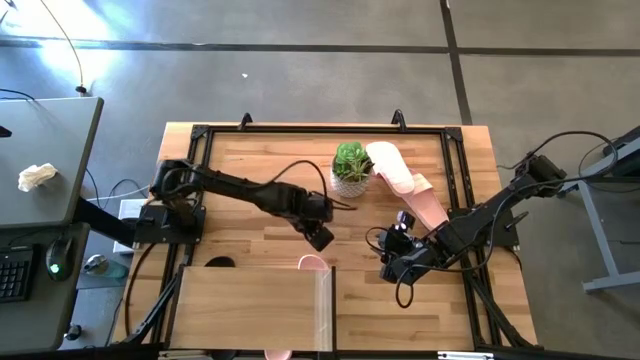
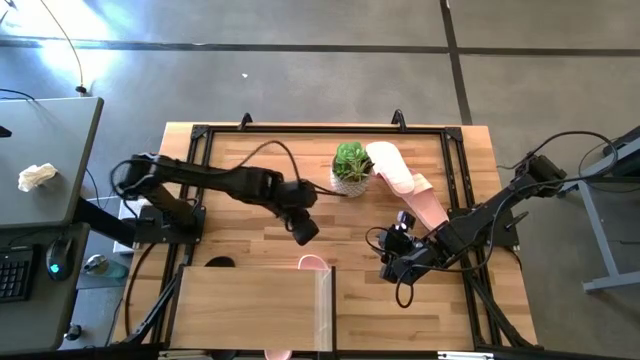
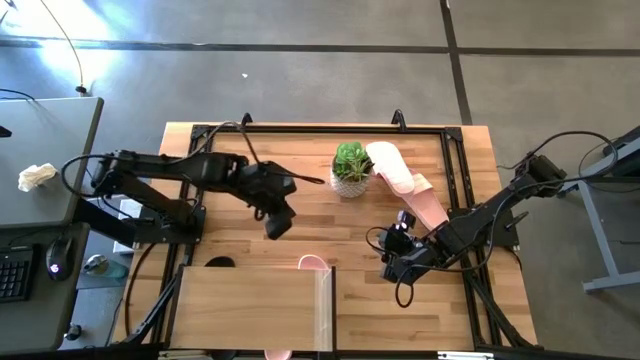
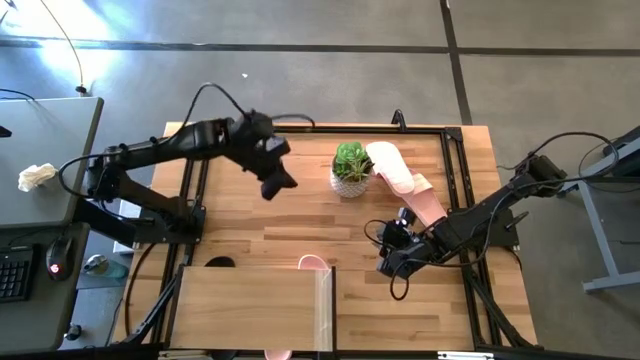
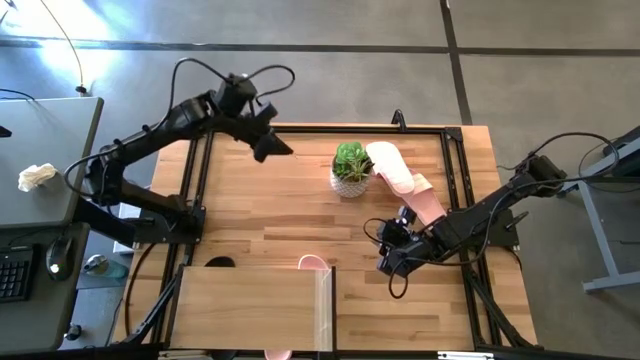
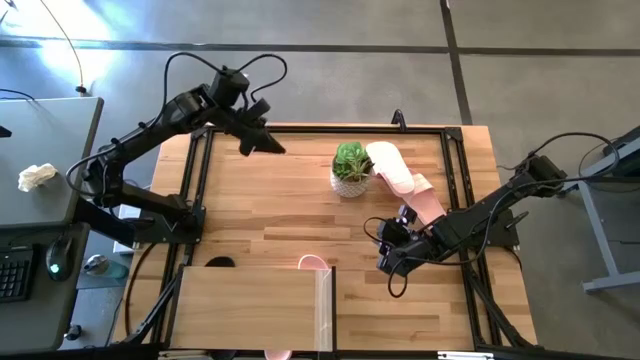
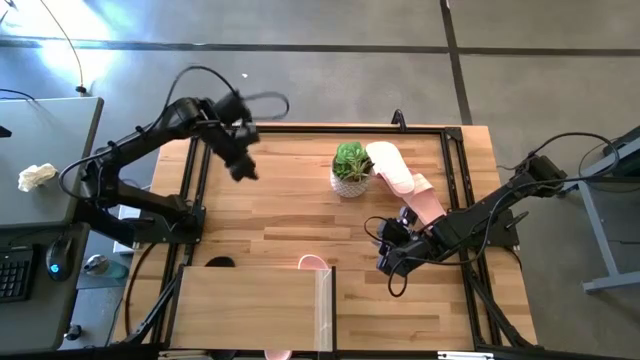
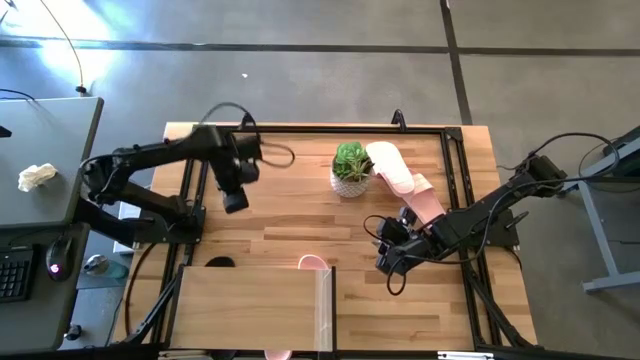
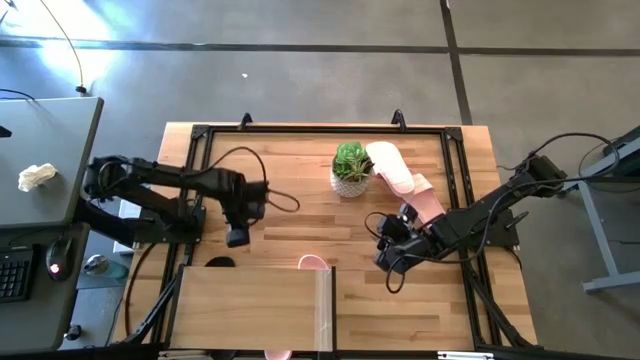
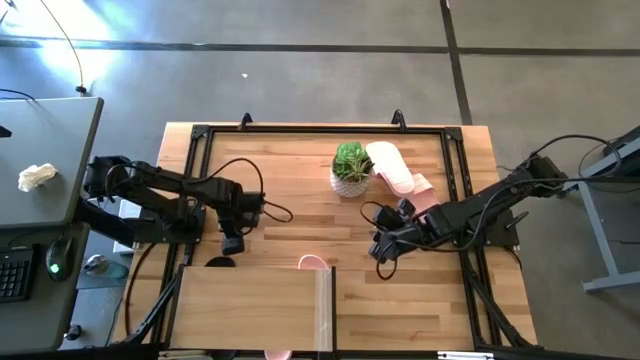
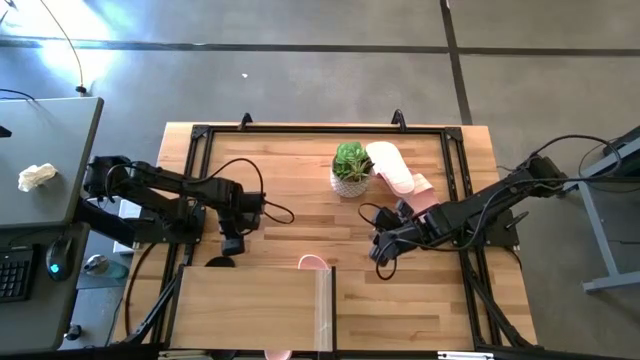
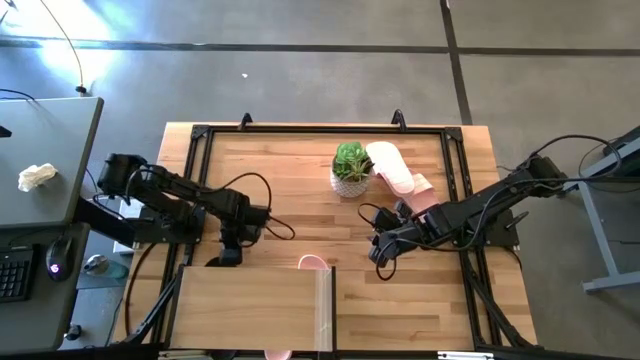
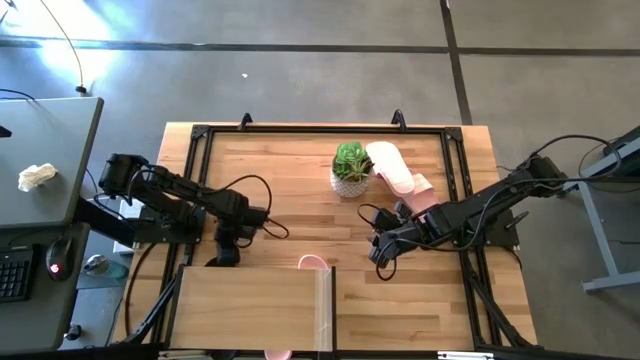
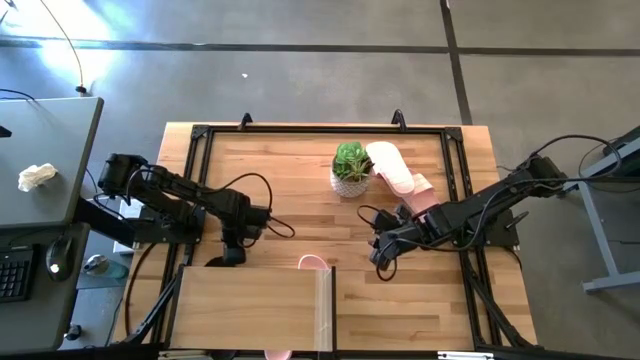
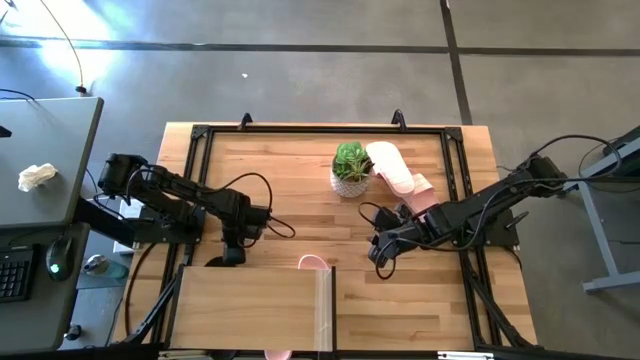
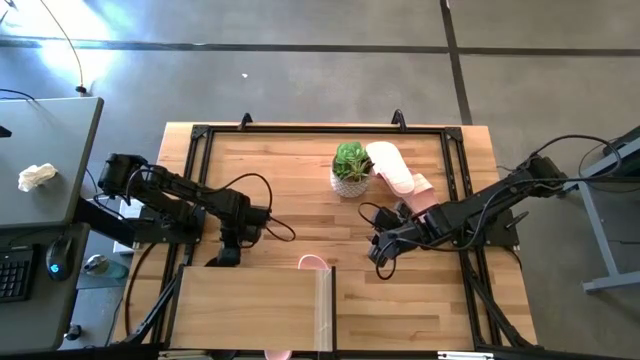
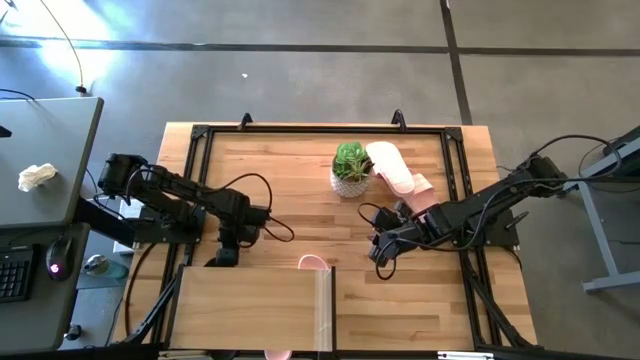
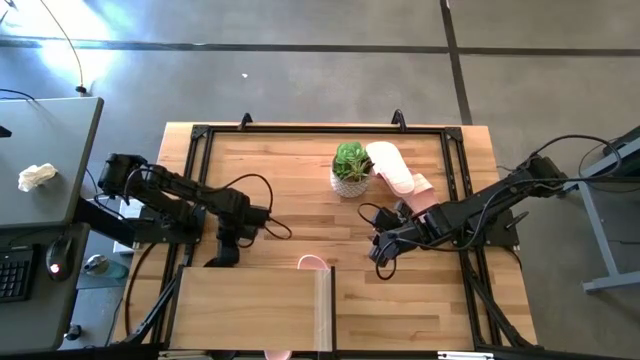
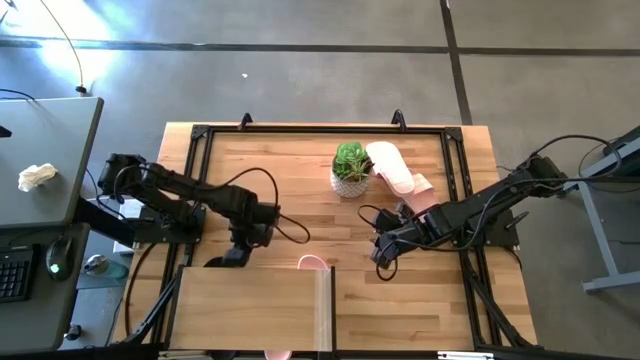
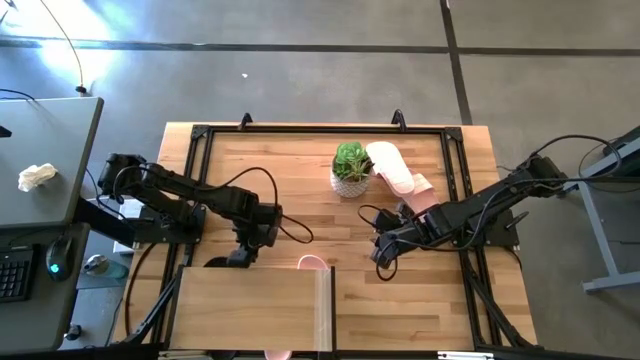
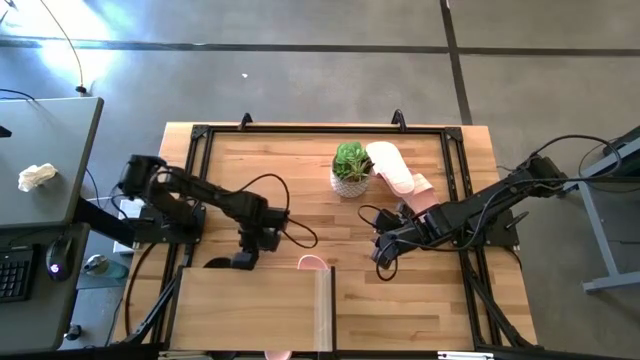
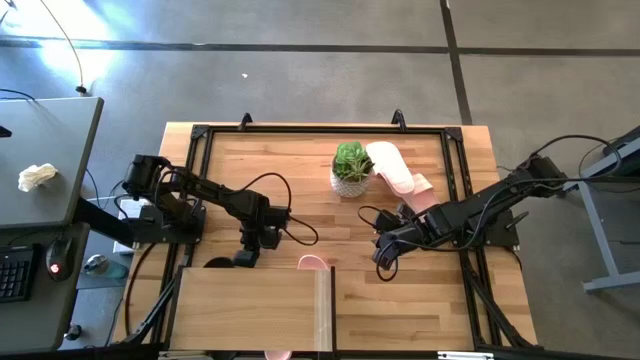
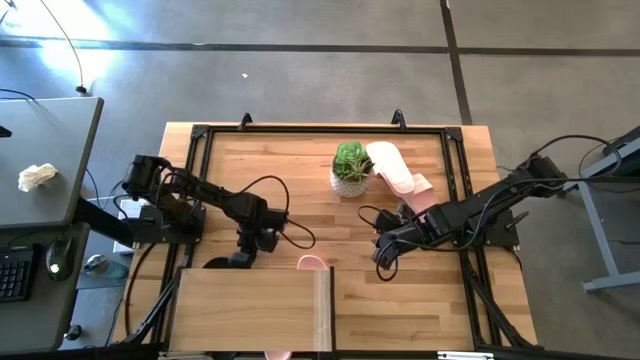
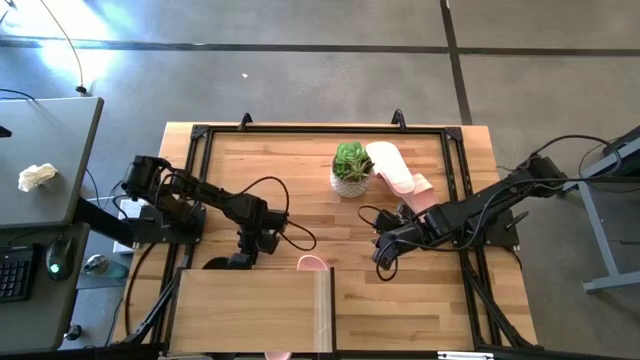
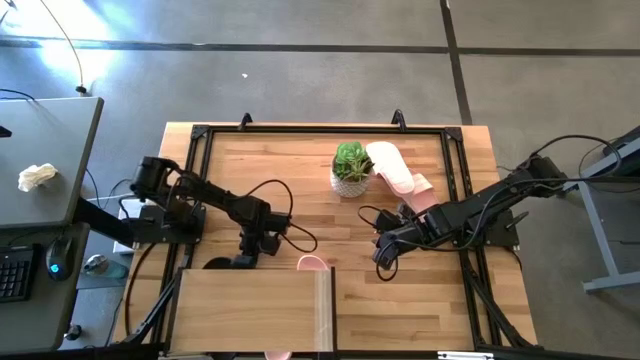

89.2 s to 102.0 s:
Task: Pick and place slides into the shelf
Adjust the slides under the shelf

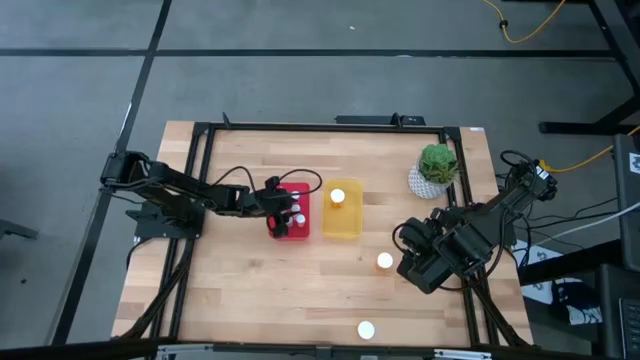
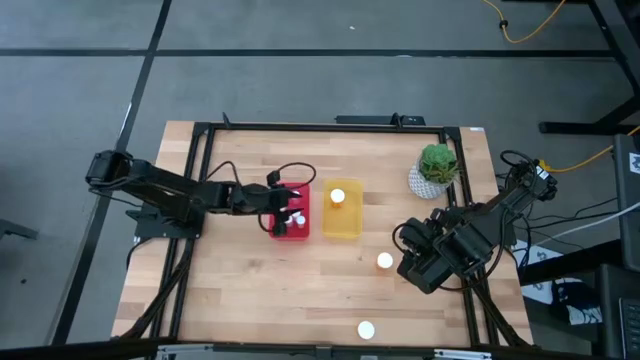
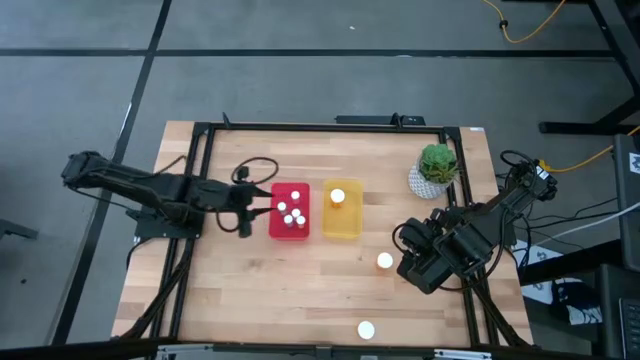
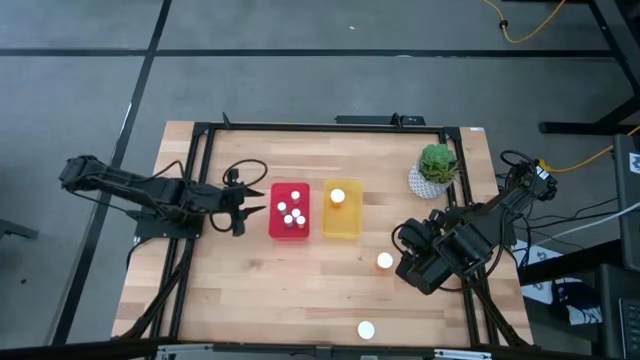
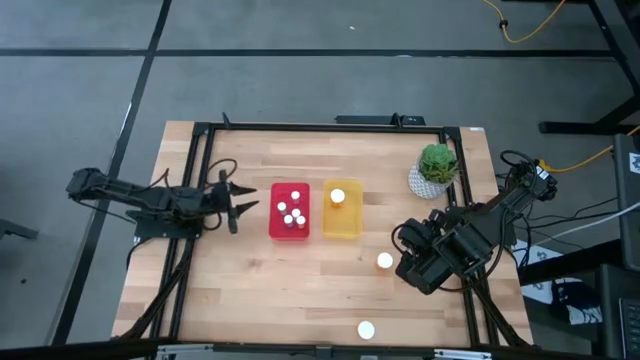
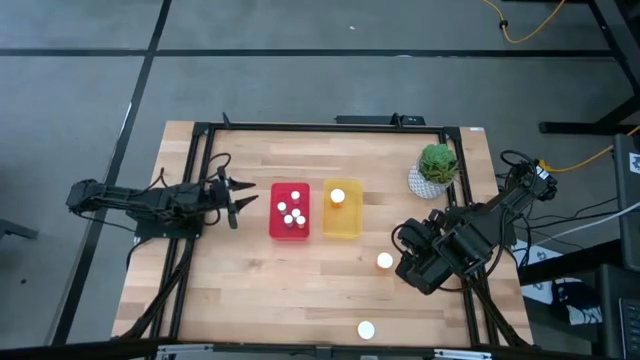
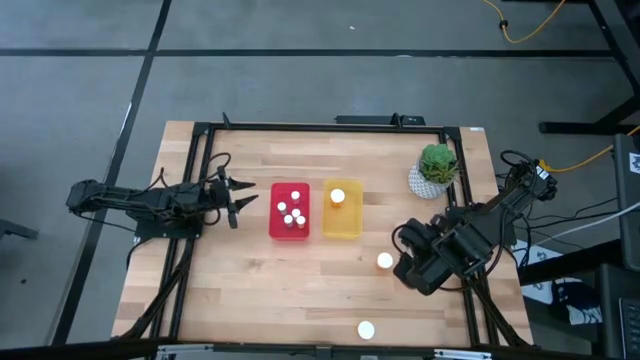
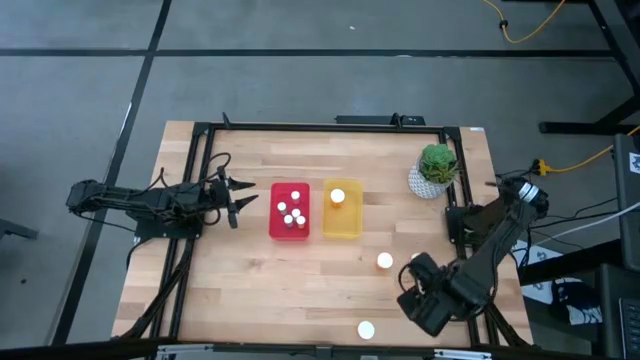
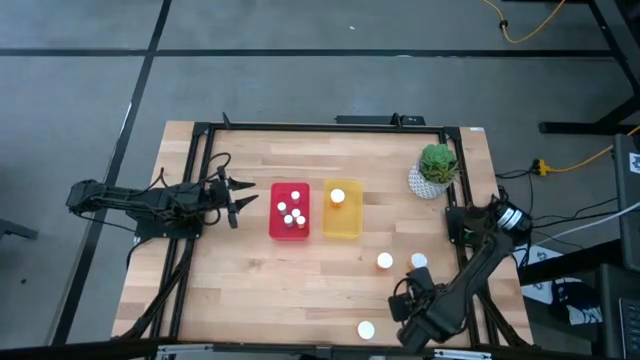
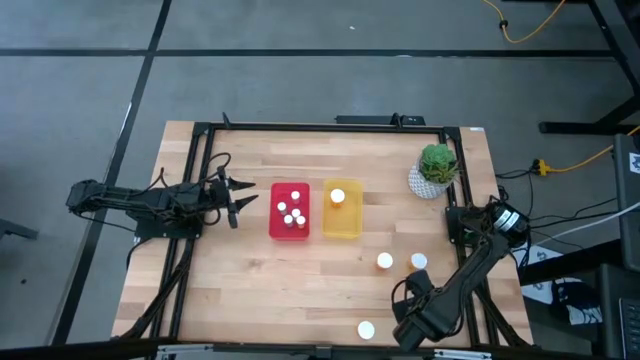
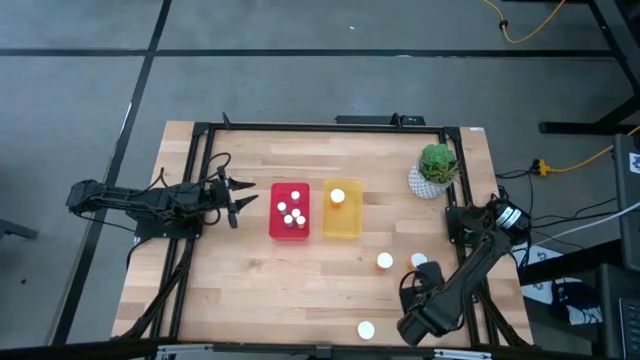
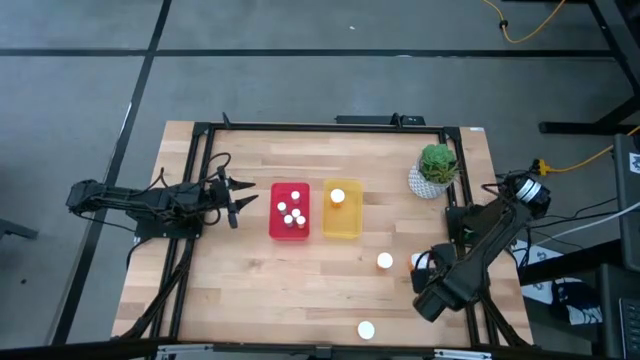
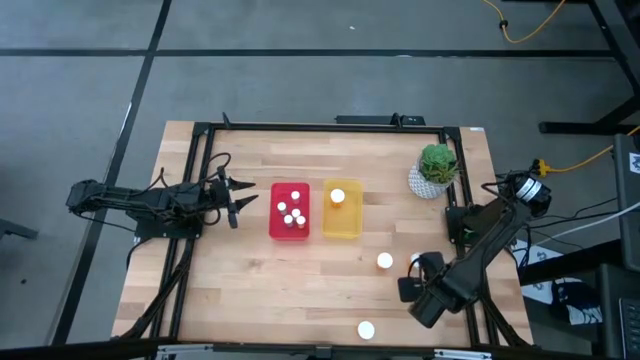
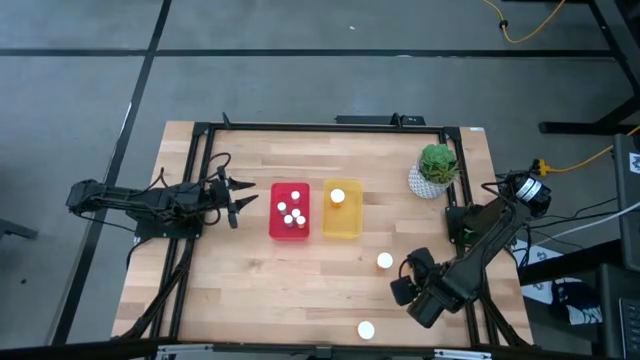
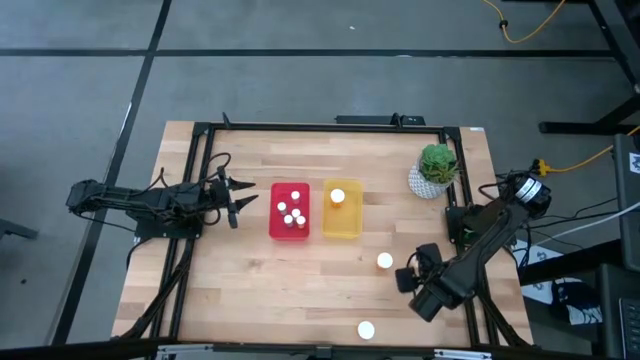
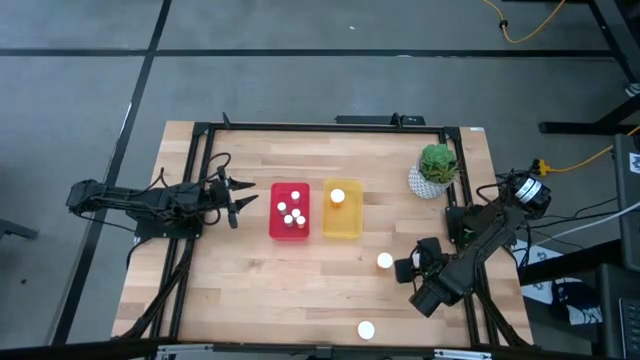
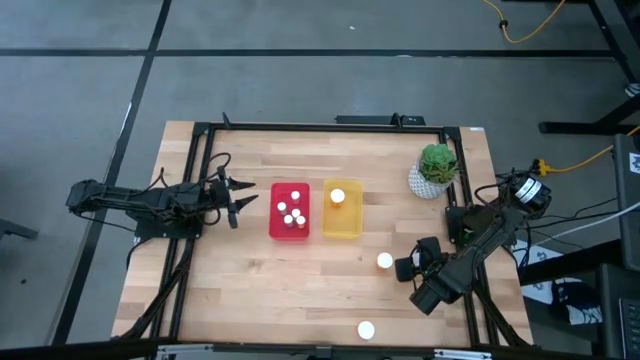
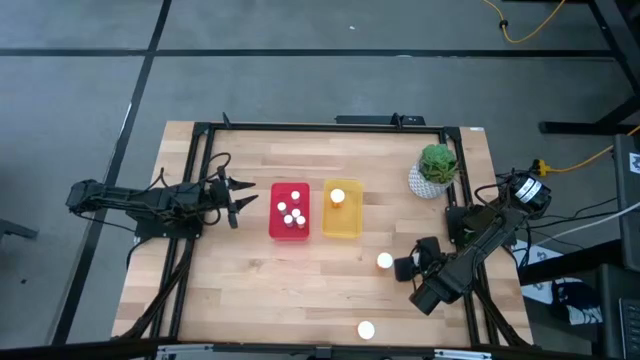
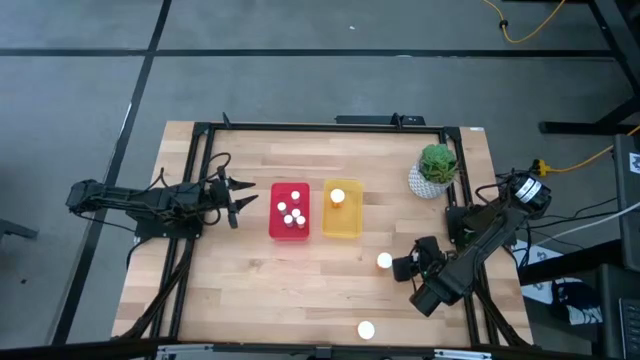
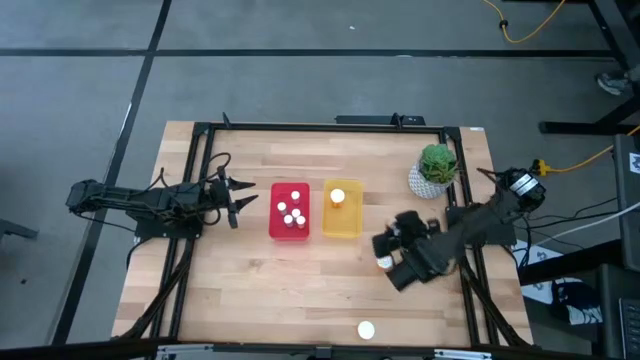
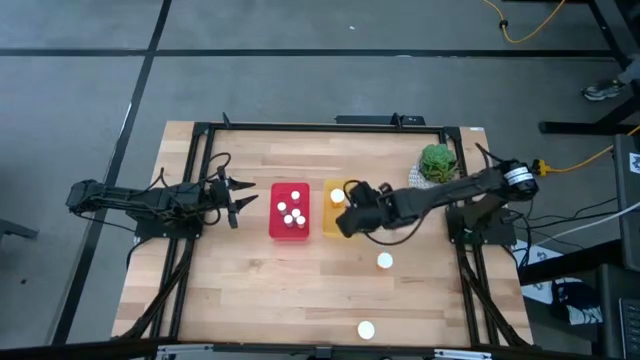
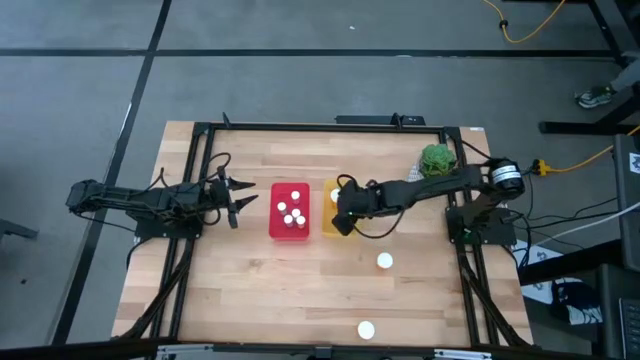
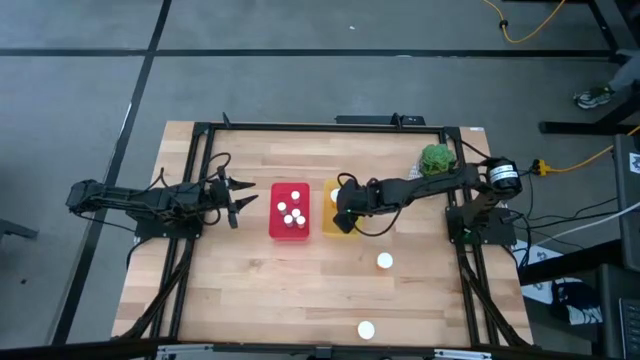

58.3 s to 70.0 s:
Task: Pick and place medicine bottles into bin by pill shape (circle, oval)
Put the large orange pill bottle into the red bin
